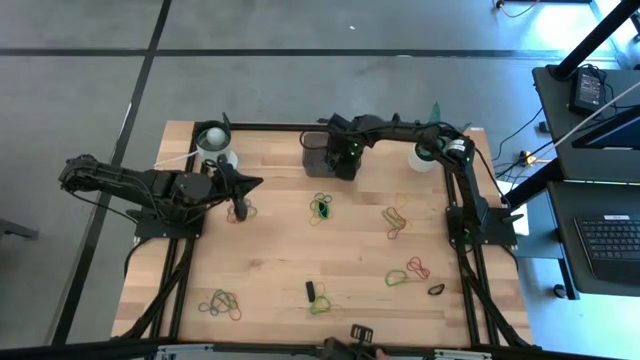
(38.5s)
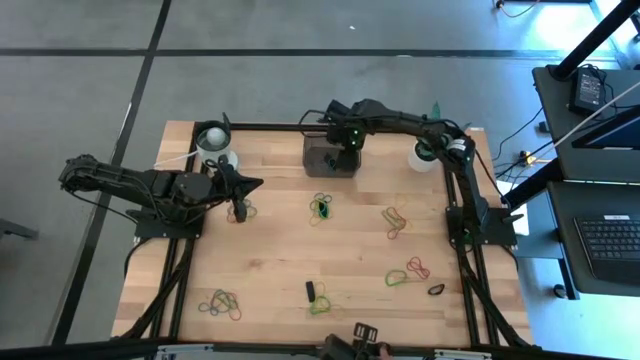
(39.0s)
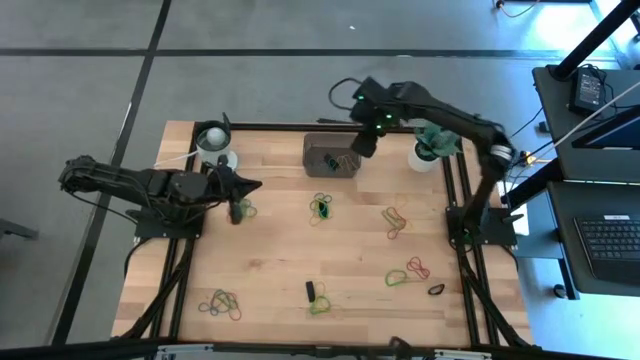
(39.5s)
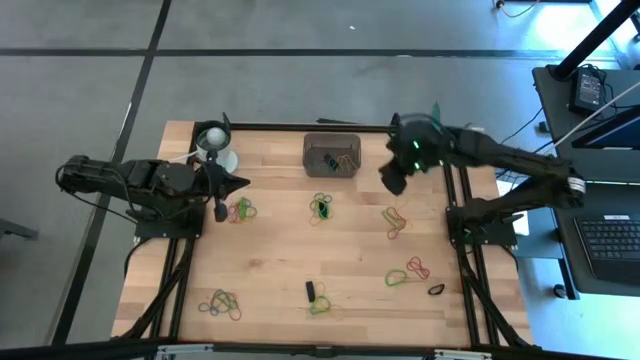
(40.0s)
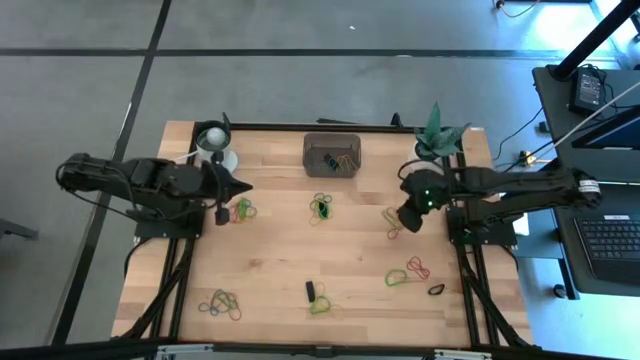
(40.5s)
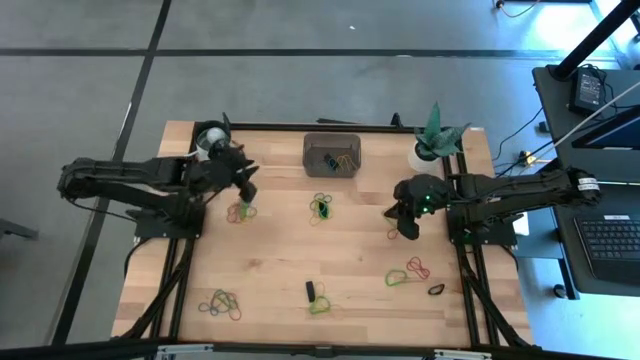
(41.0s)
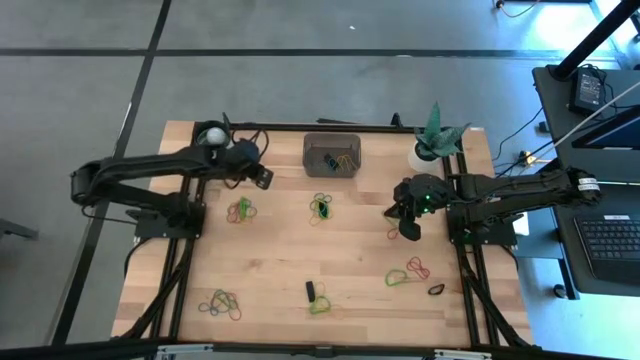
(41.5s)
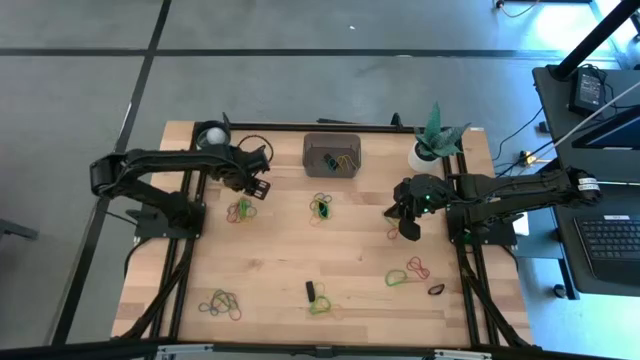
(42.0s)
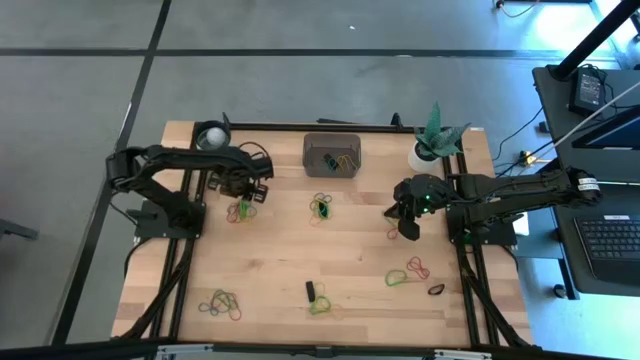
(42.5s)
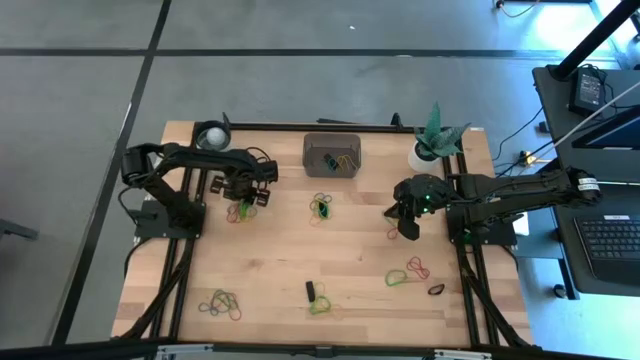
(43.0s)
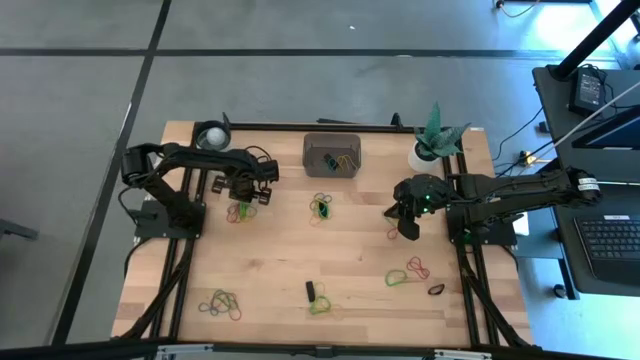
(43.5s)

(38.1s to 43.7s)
Task: Pick and place rubber bands into bin
Put the green rubber band into the bin

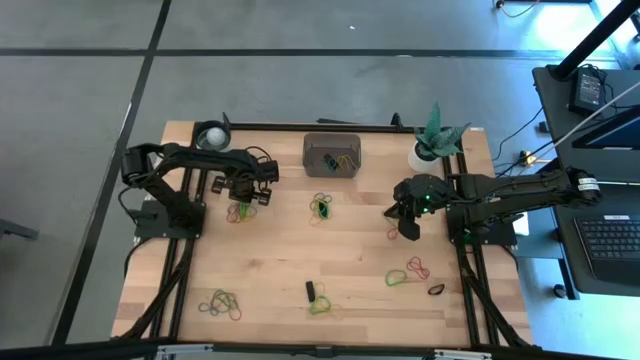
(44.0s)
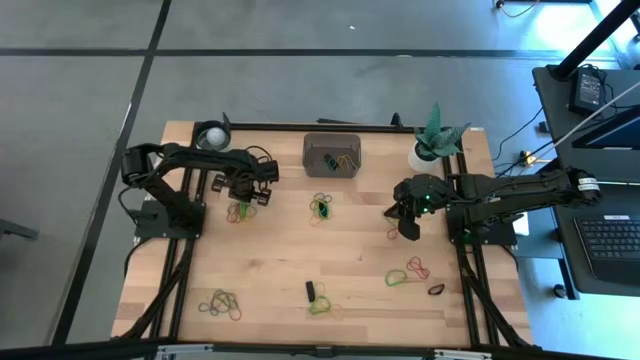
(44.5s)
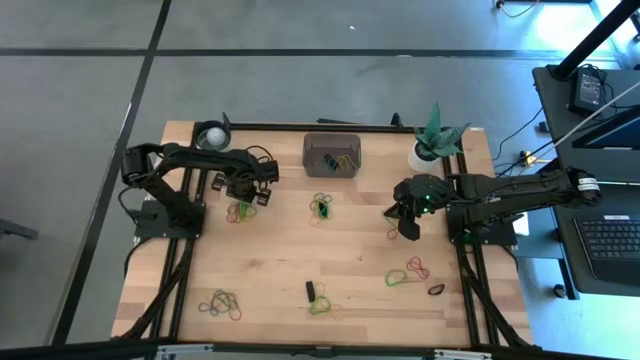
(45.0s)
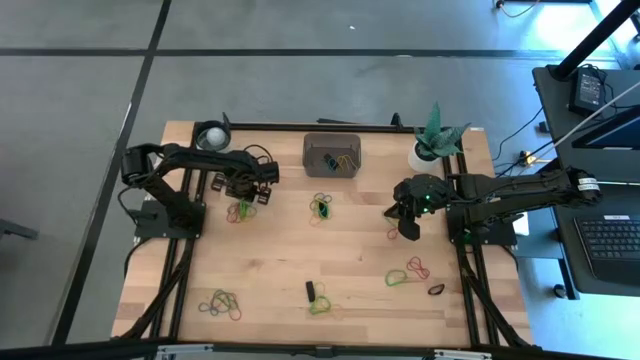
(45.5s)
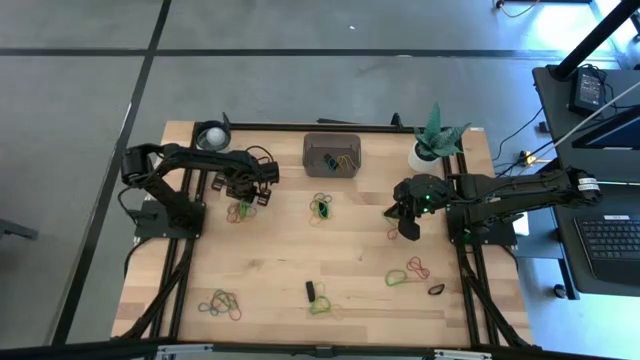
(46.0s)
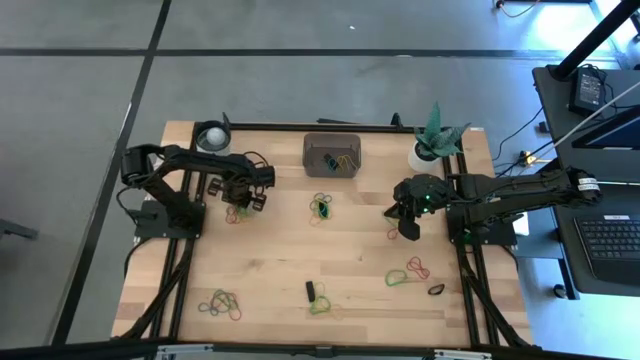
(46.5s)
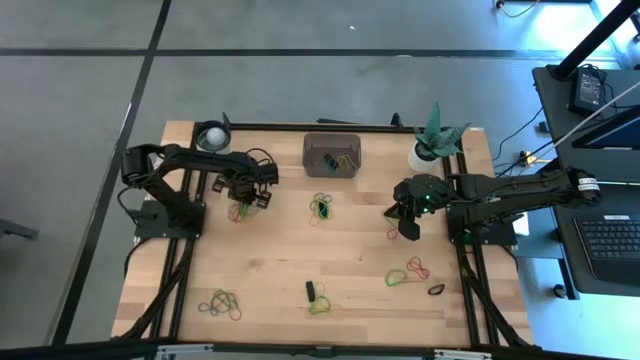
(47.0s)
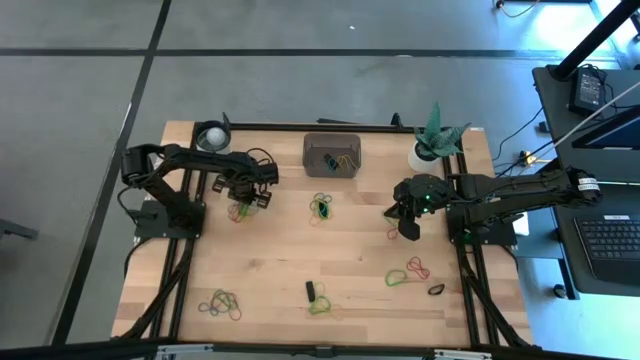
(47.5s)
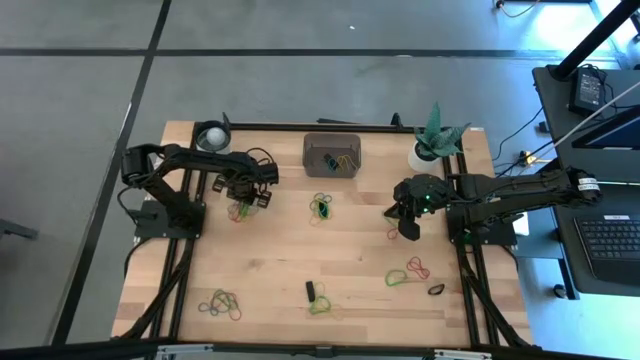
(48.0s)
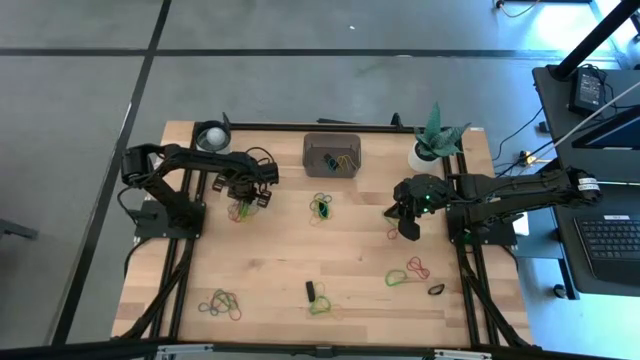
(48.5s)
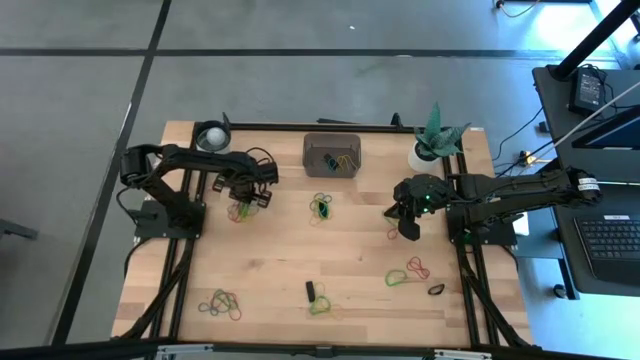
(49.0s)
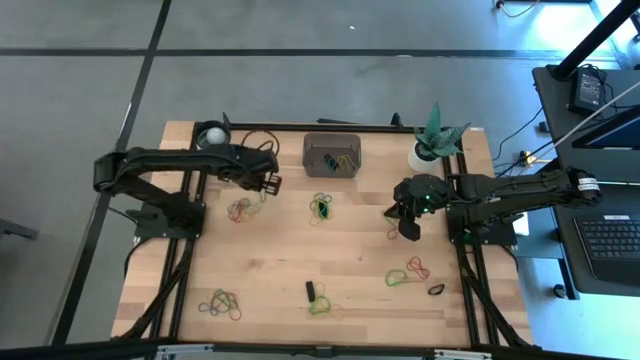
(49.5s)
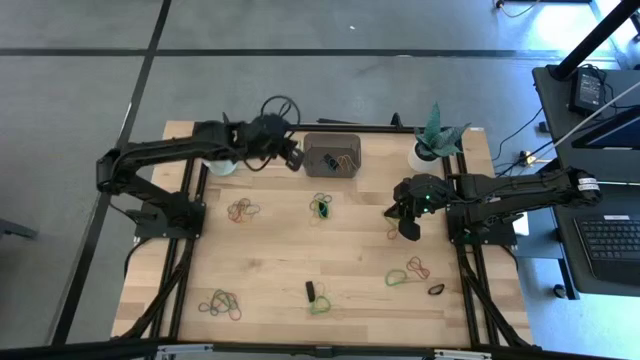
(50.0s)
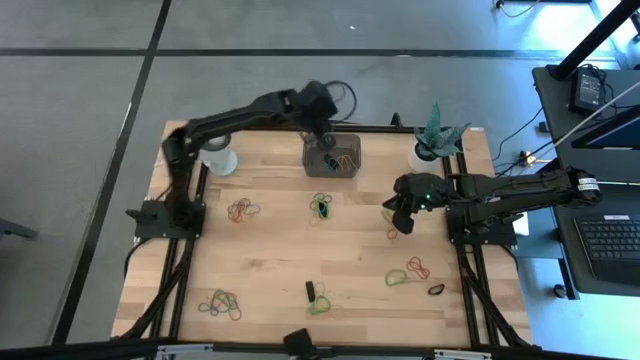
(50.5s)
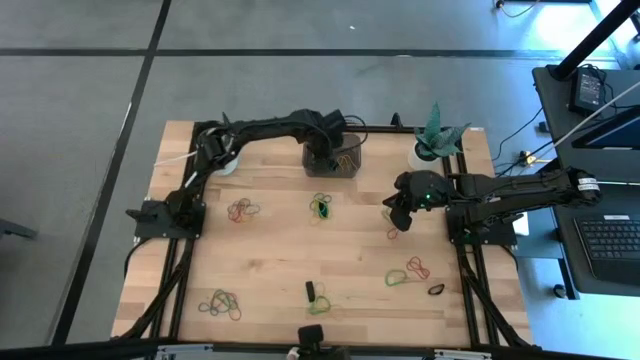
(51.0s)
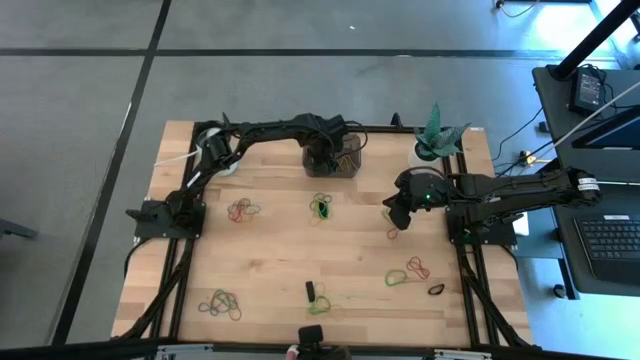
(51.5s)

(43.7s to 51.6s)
Put the green rubber band into the bin

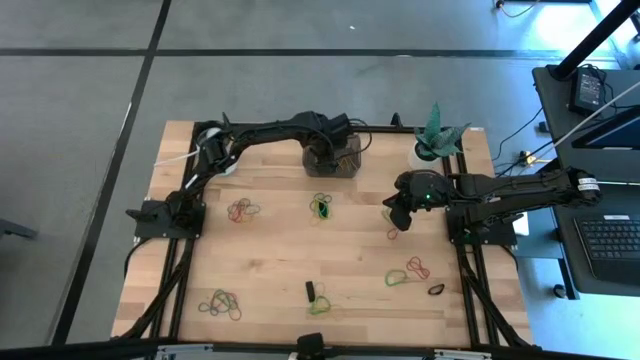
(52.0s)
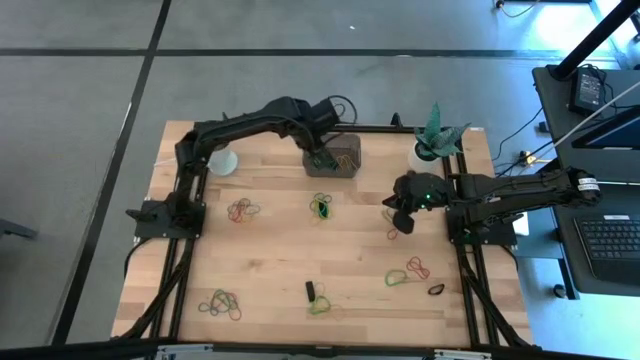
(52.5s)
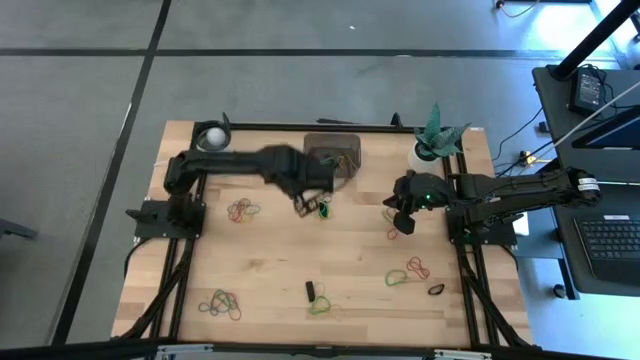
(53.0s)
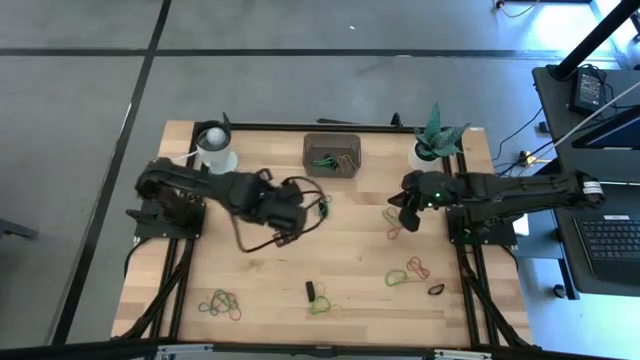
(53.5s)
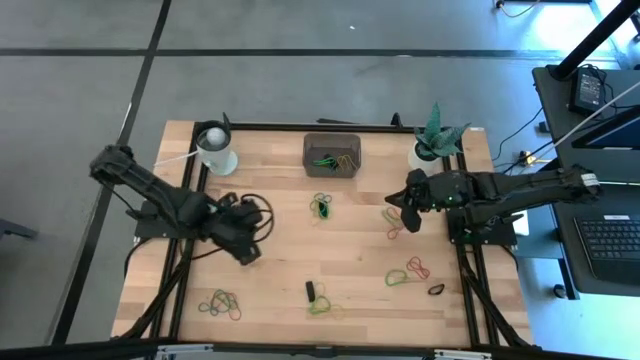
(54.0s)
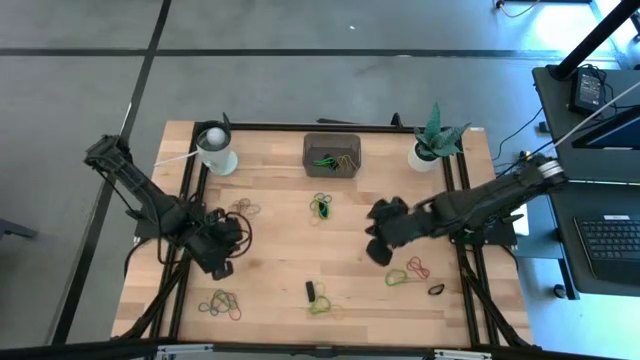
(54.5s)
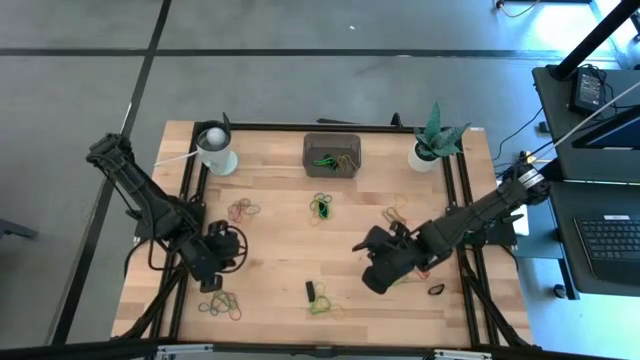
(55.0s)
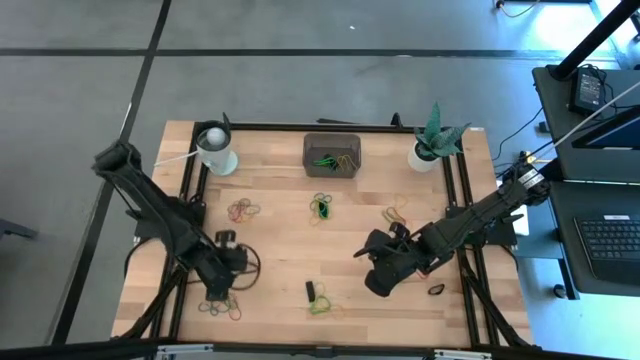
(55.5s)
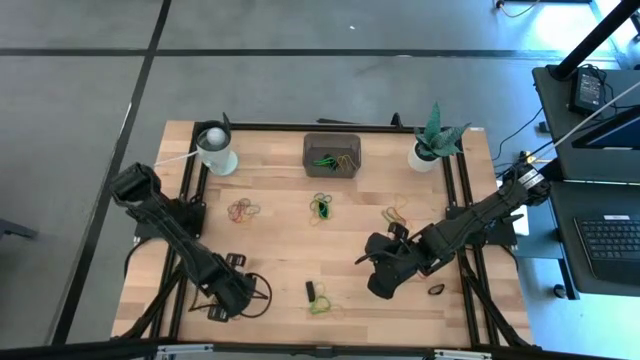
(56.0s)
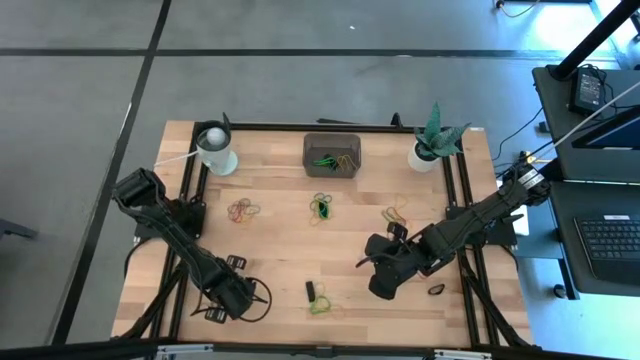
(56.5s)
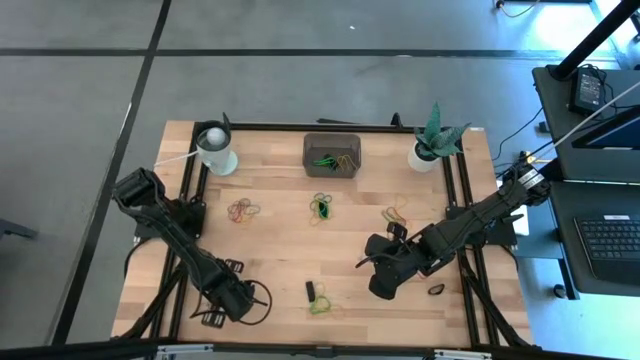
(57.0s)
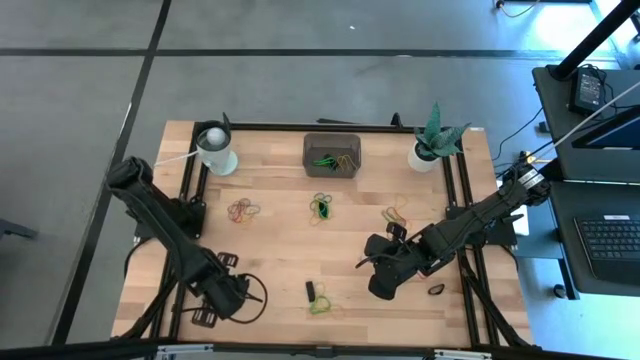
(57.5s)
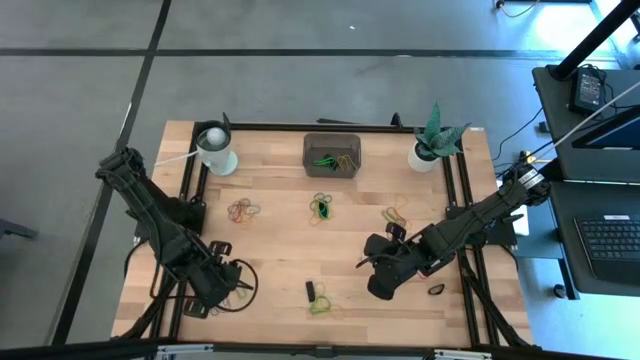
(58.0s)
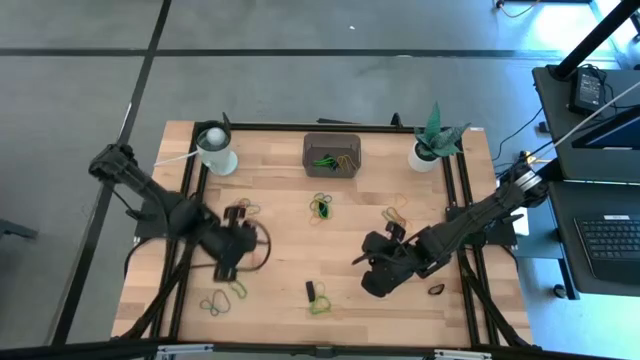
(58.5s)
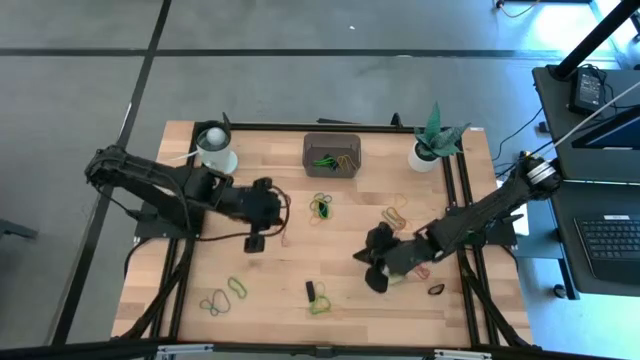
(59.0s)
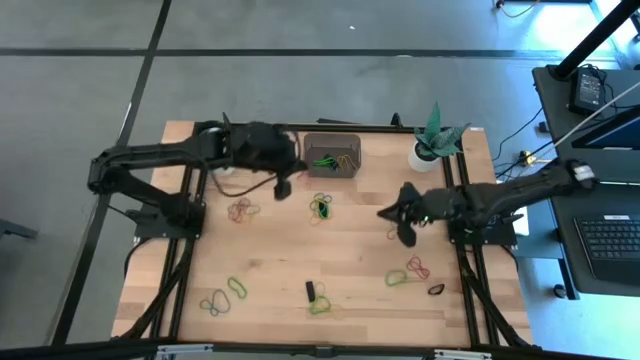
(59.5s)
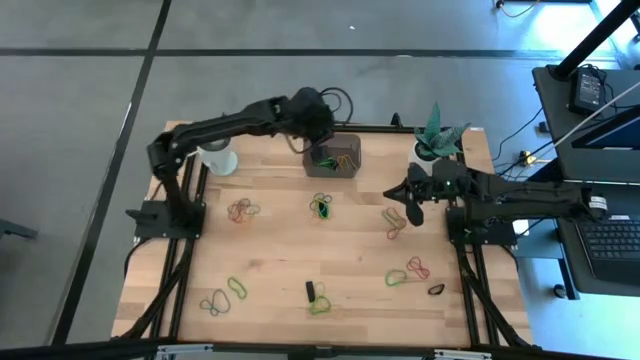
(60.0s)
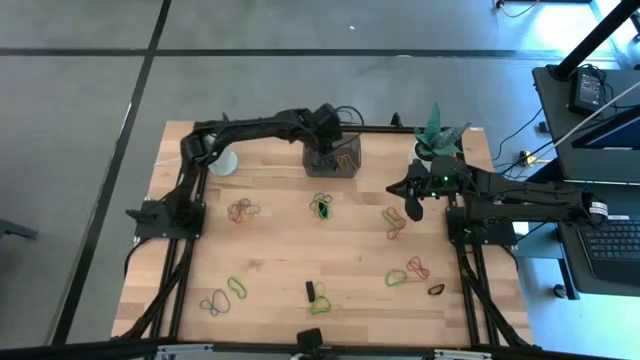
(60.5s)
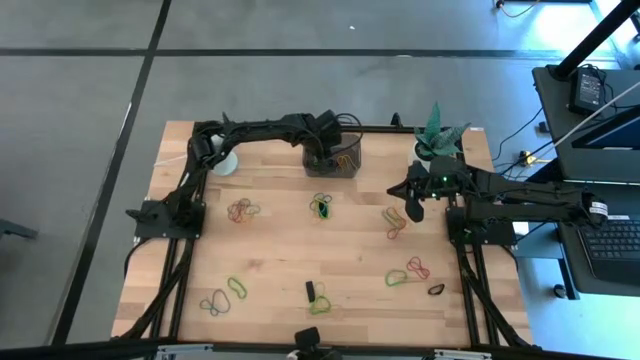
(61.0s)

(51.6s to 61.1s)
Put the red rubber band into the bin
